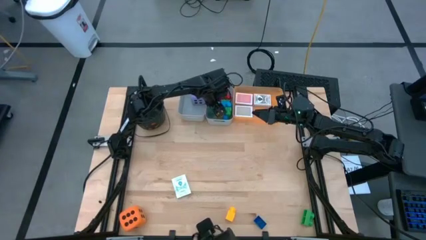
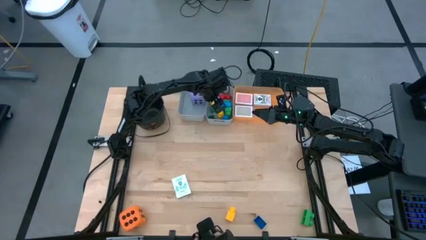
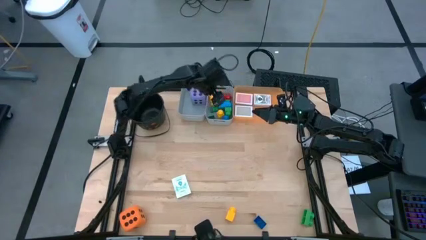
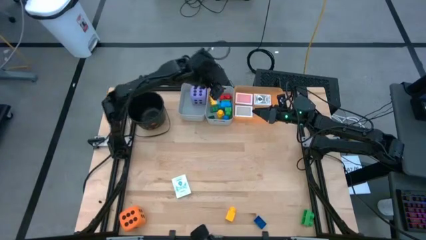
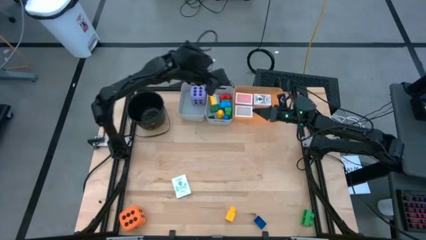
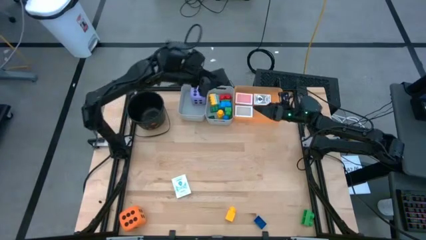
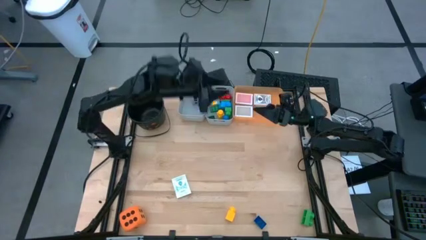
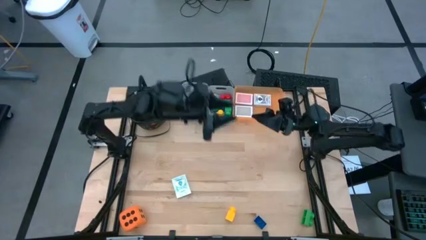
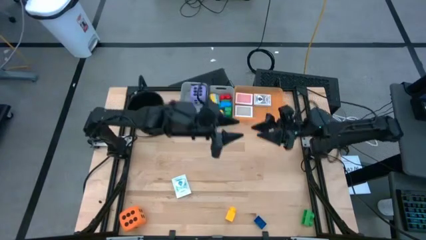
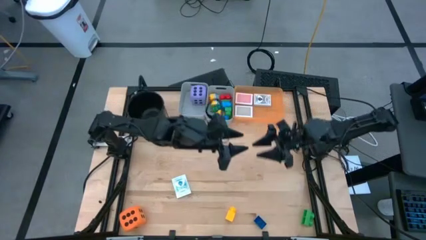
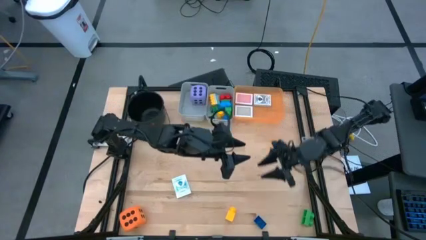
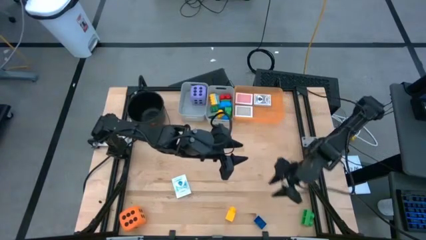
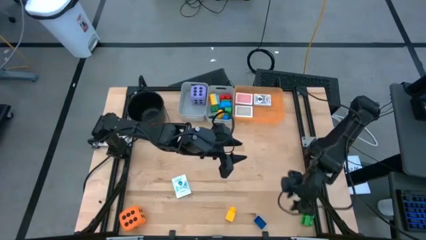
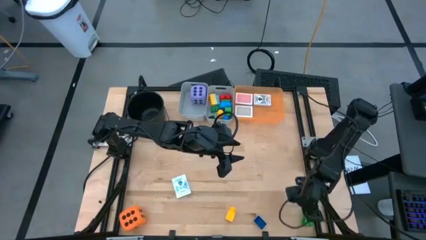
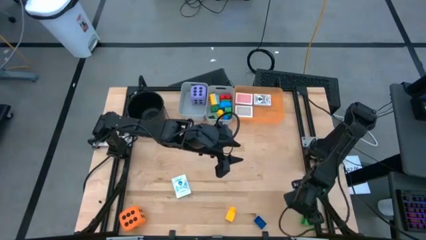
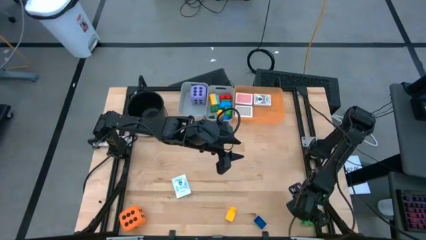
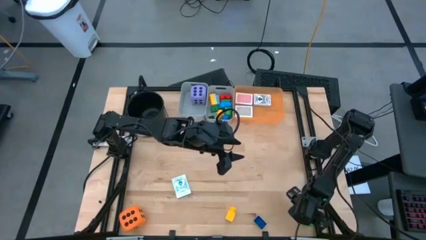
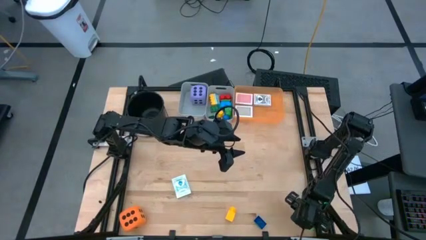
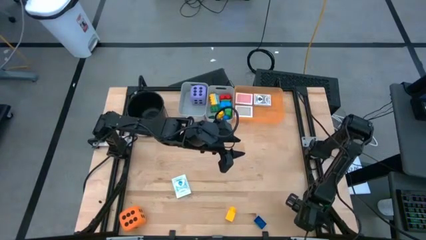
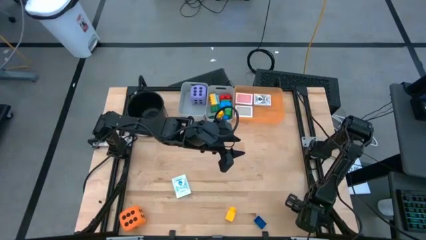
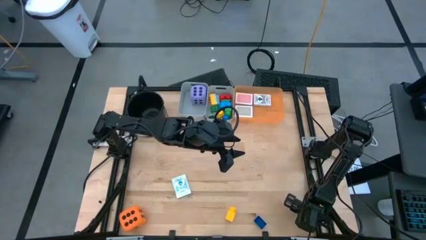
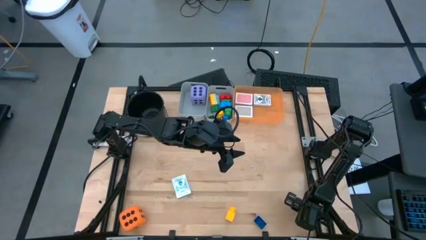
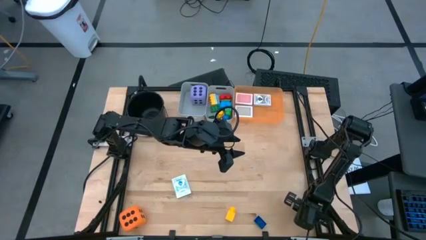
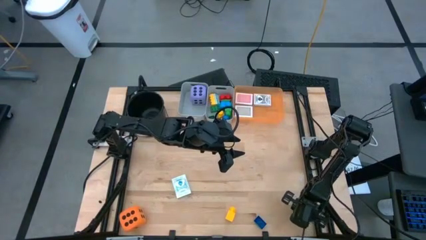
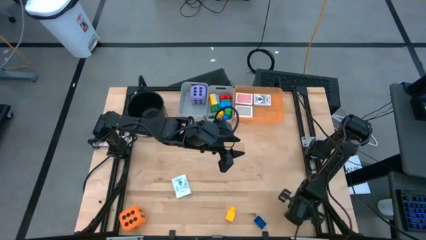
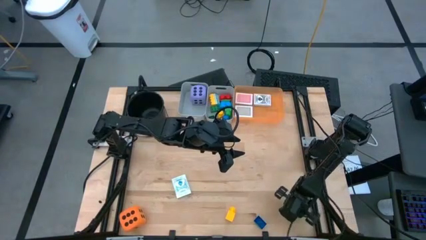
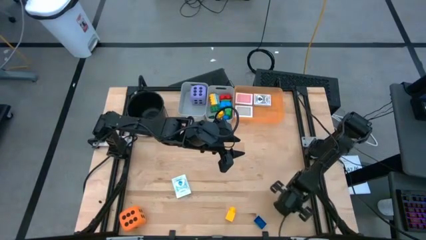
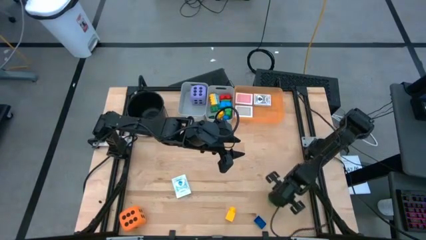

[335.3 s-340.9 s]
Task: Pick & Place Toys
Put the green gamepiece into the right gray bin

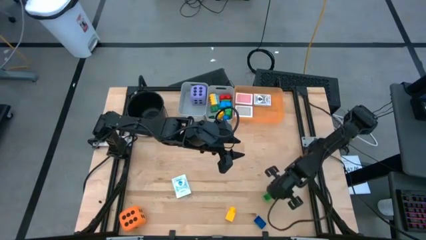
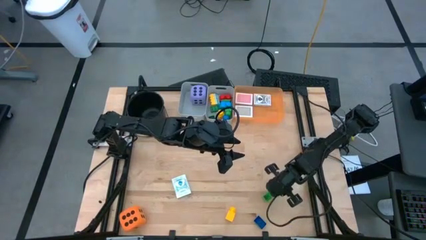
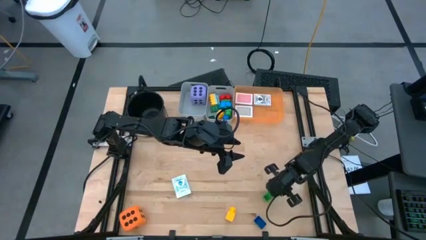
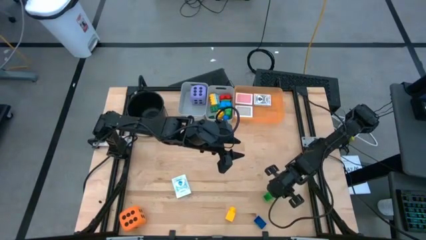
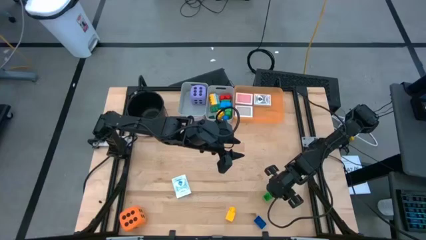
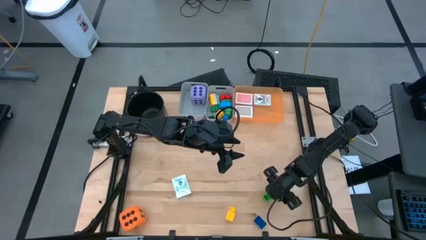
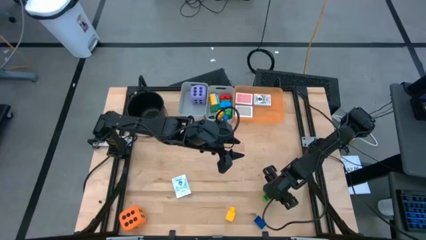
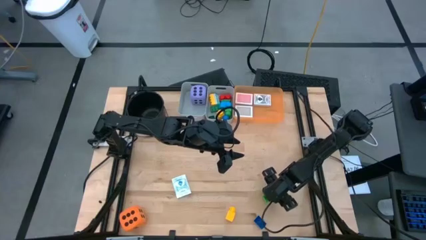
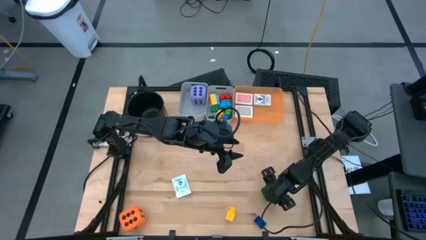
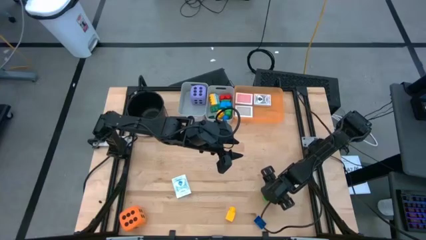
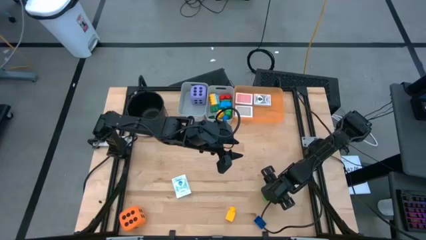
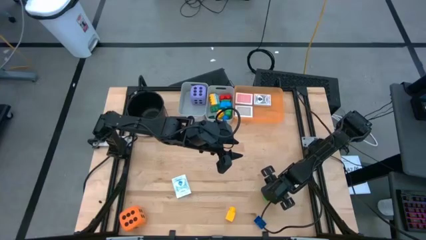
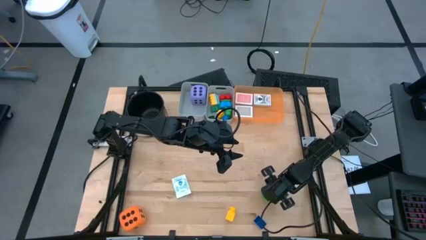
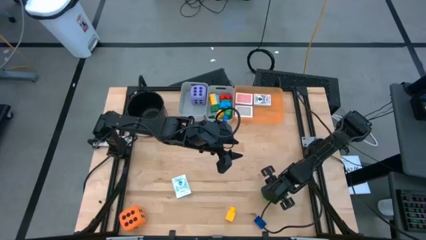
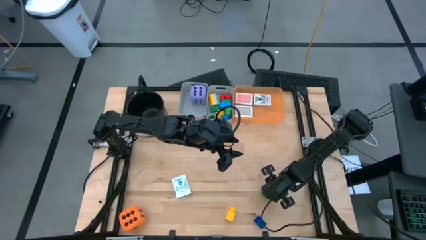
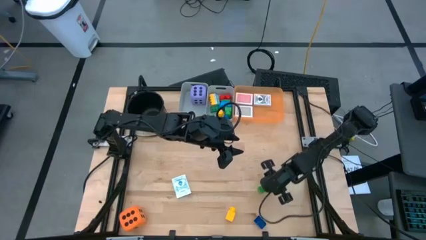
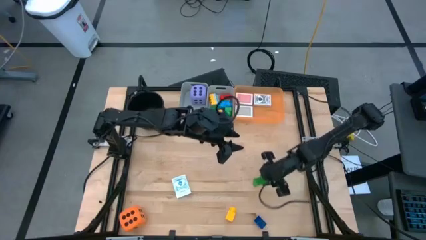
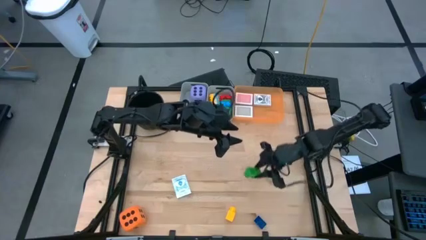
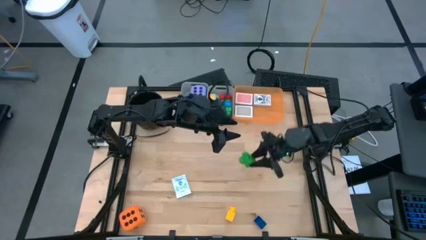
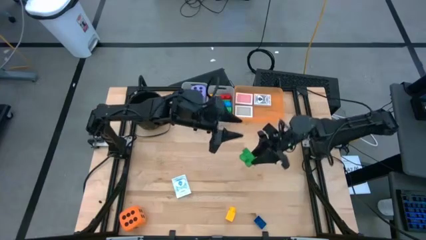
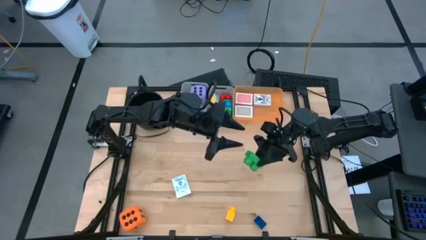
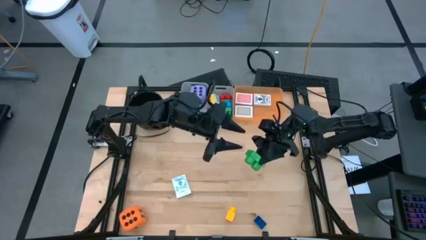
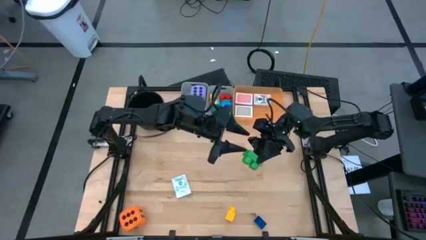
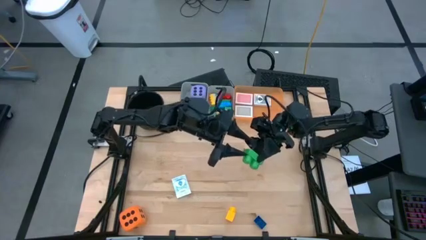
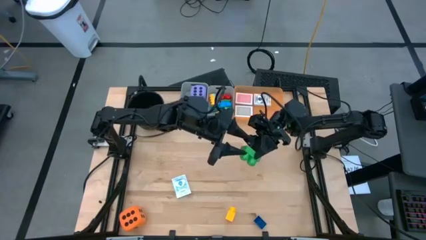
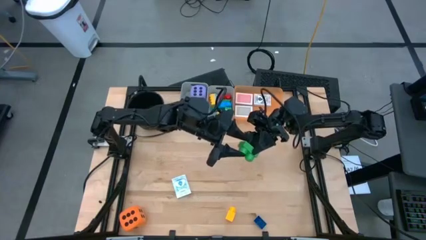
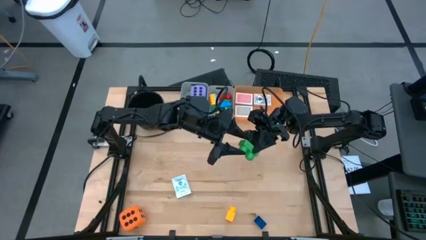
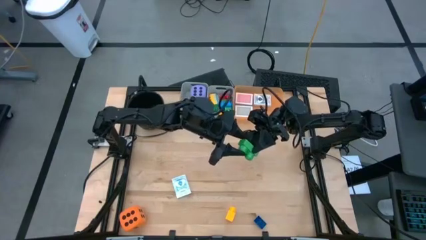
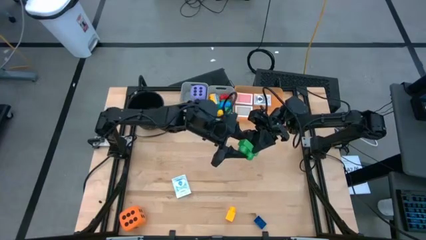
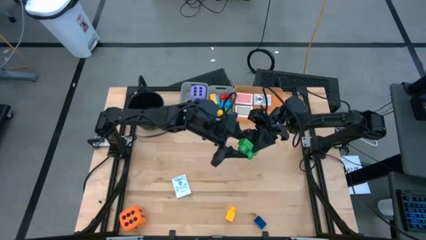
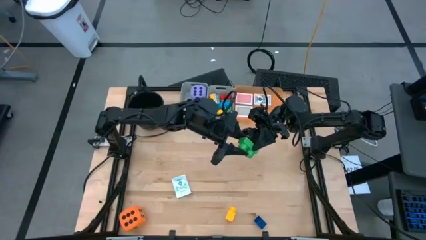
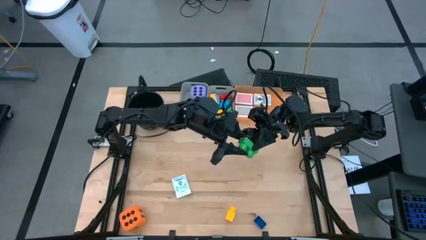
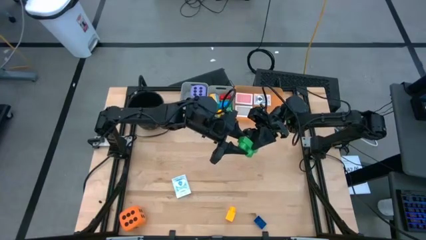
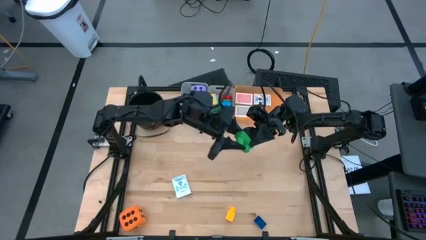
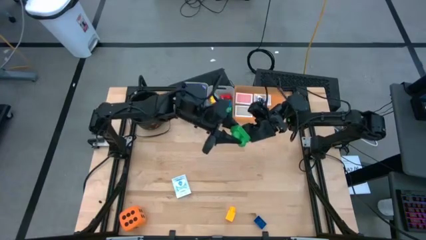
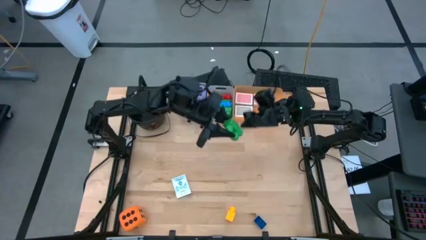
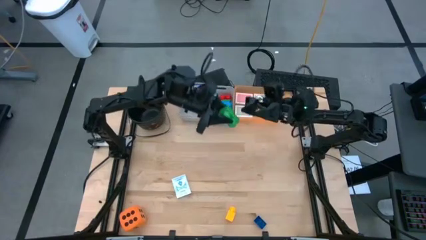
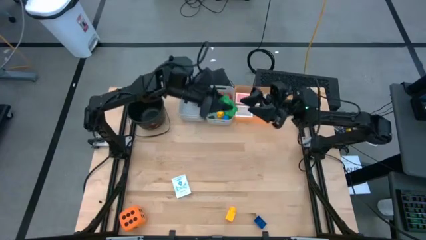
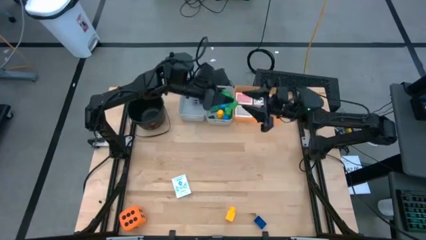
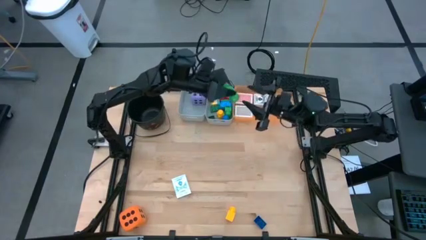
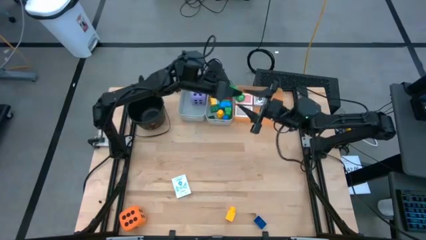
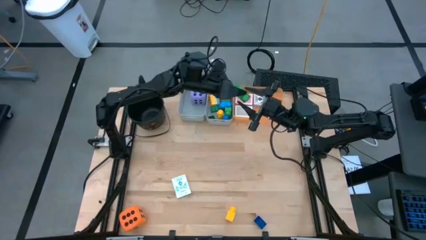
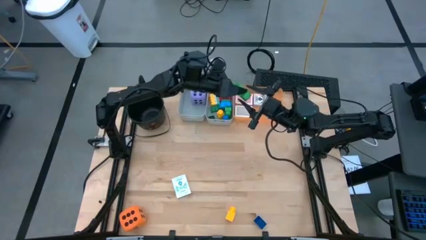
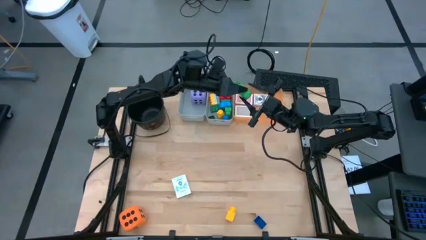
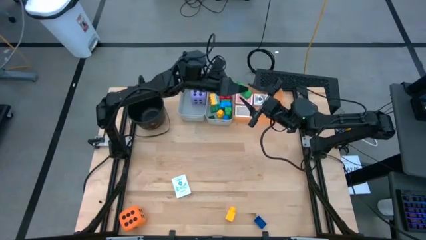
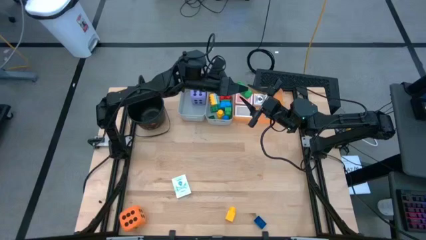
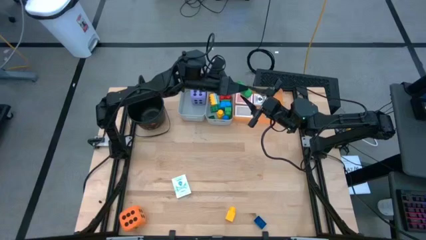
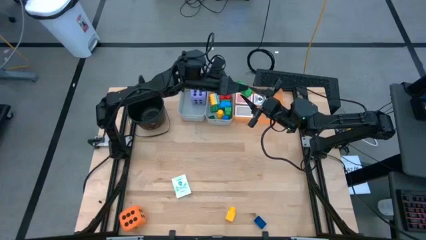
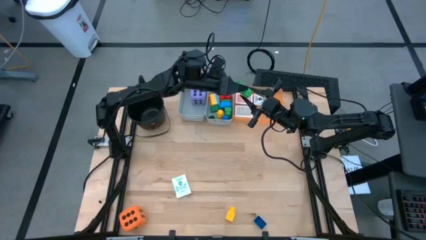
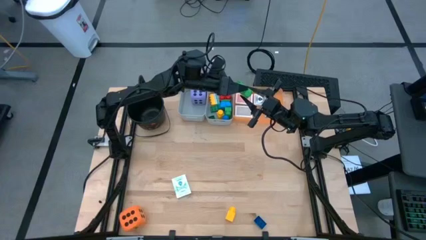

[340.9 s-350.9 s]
Put the green gamepiece into the right gray bin
